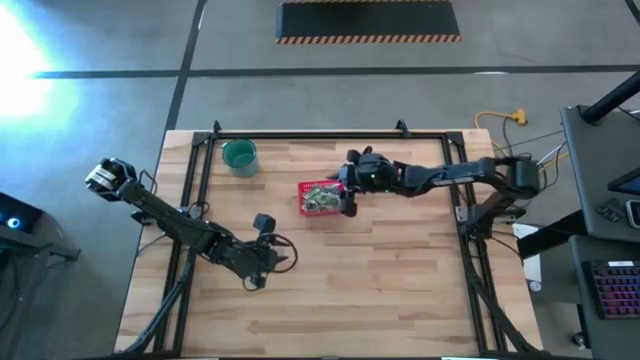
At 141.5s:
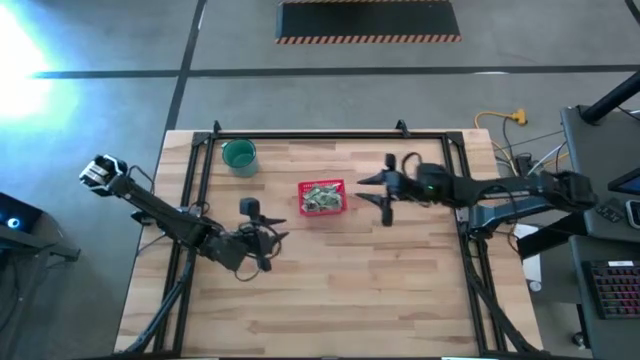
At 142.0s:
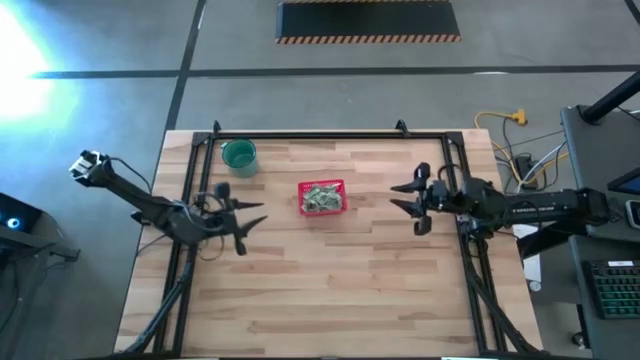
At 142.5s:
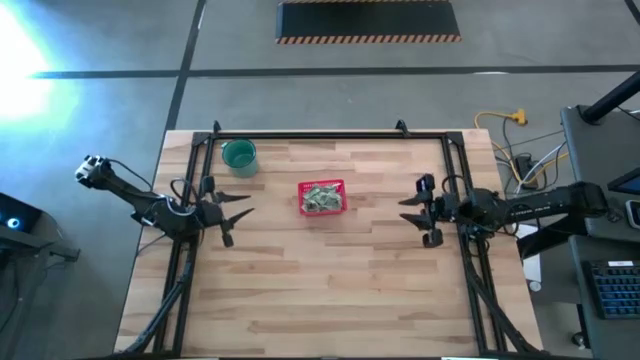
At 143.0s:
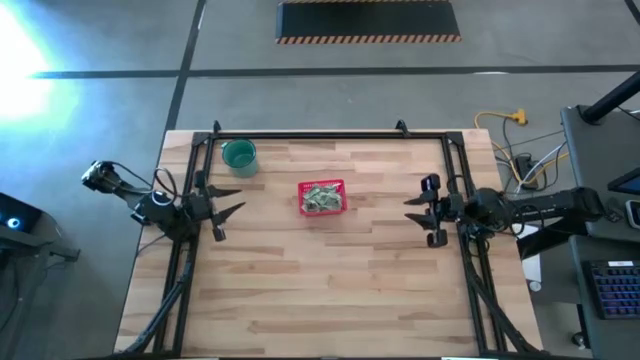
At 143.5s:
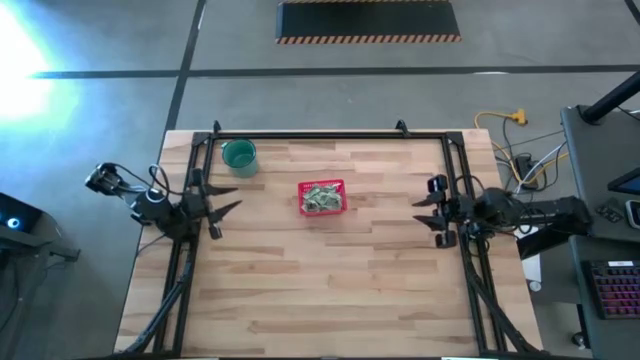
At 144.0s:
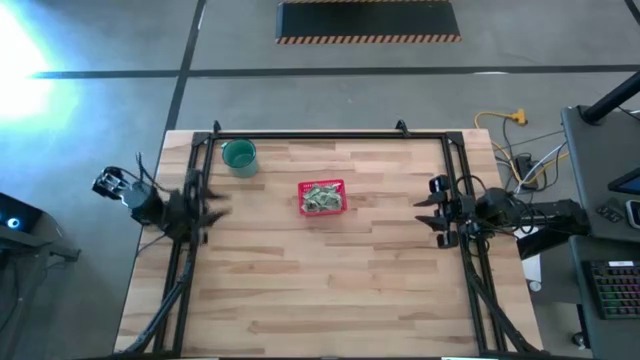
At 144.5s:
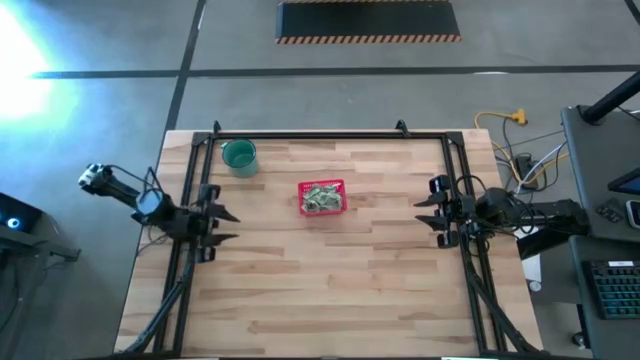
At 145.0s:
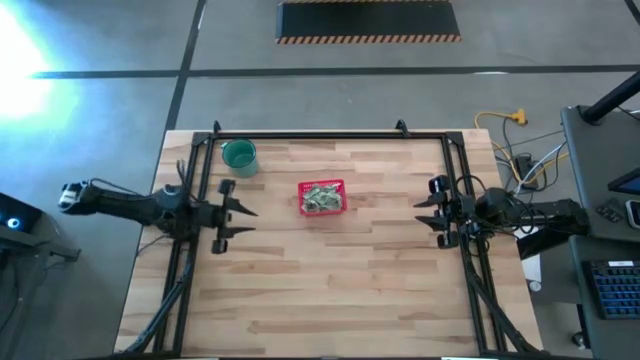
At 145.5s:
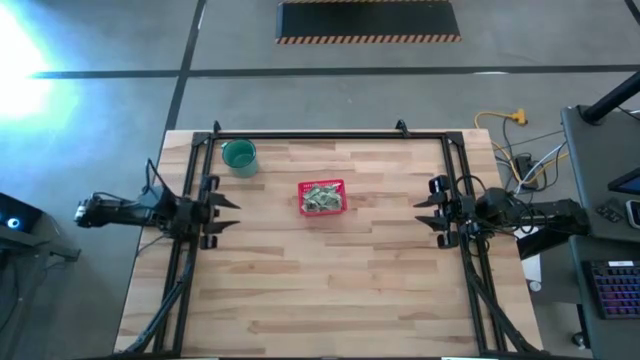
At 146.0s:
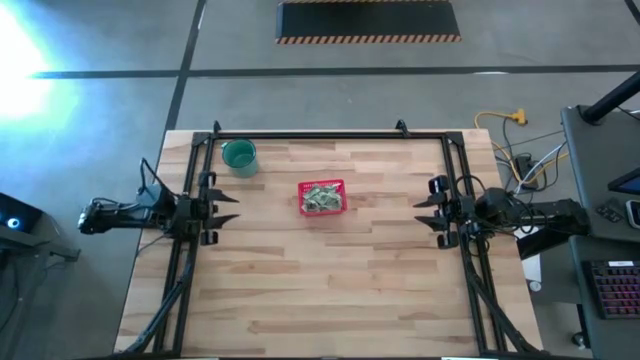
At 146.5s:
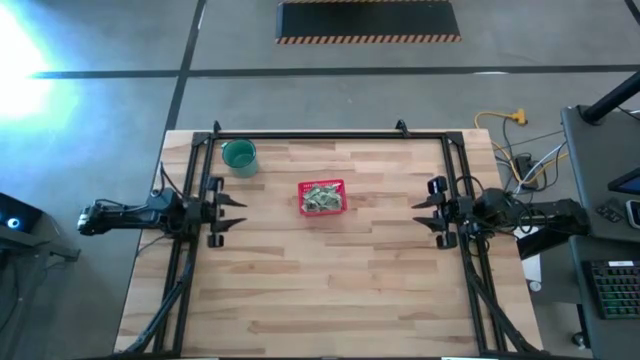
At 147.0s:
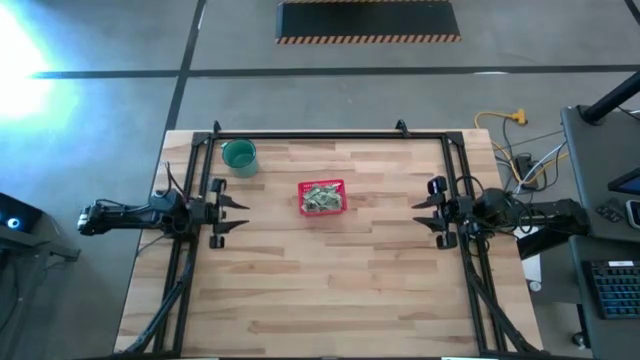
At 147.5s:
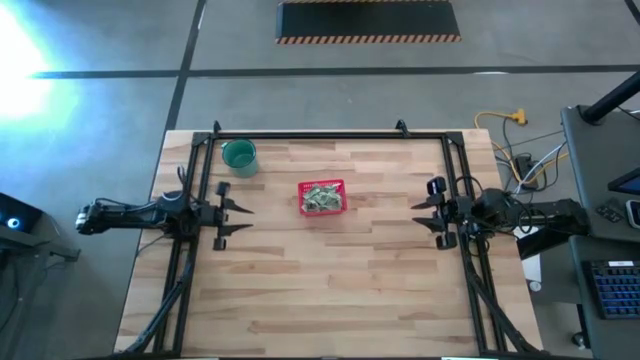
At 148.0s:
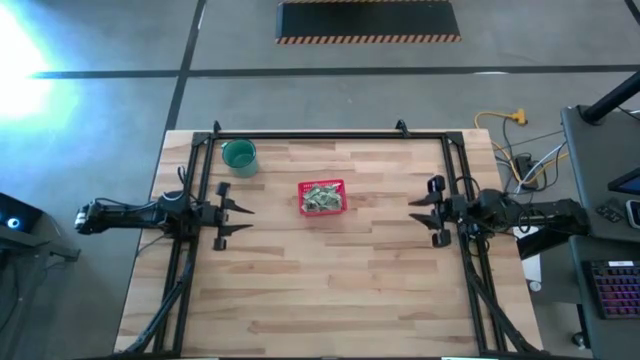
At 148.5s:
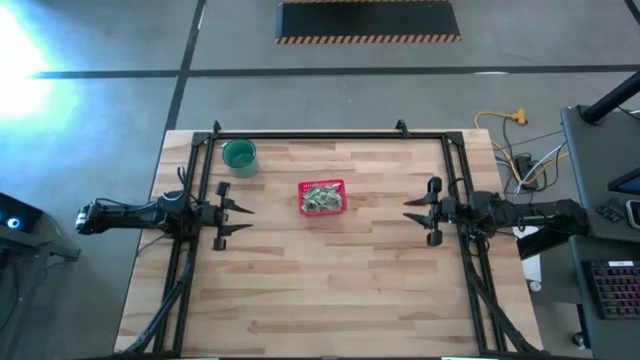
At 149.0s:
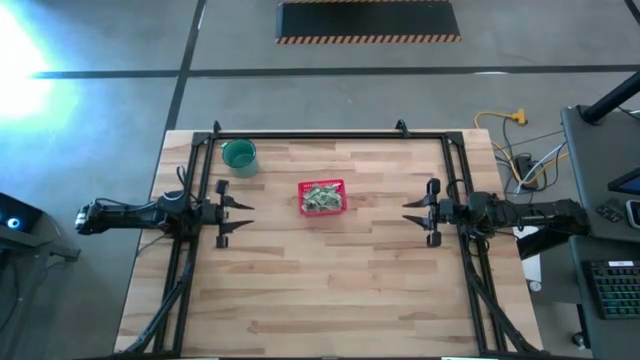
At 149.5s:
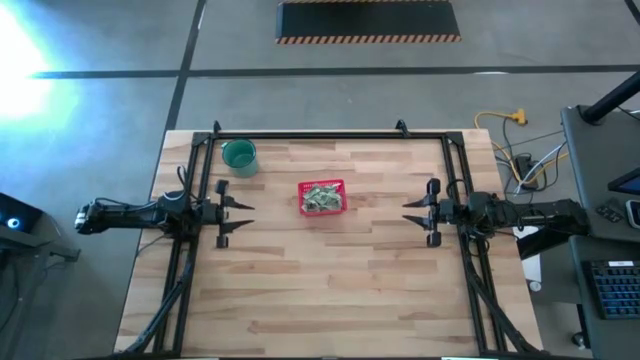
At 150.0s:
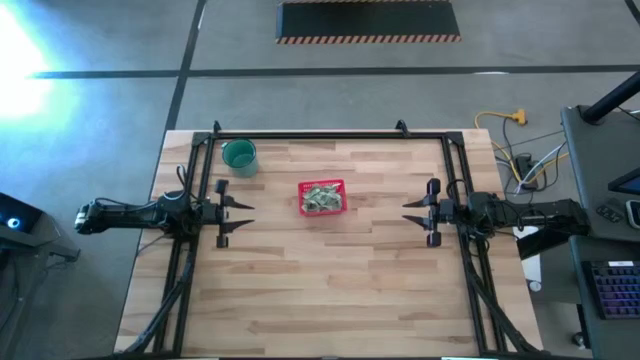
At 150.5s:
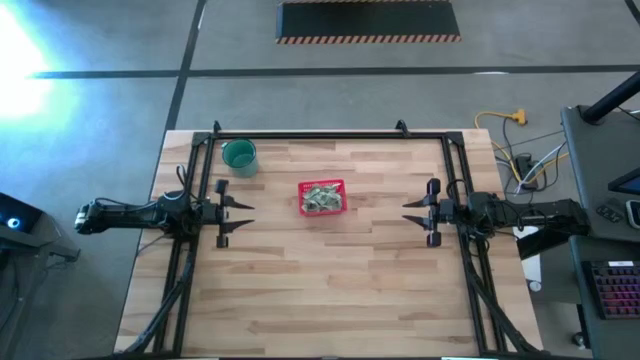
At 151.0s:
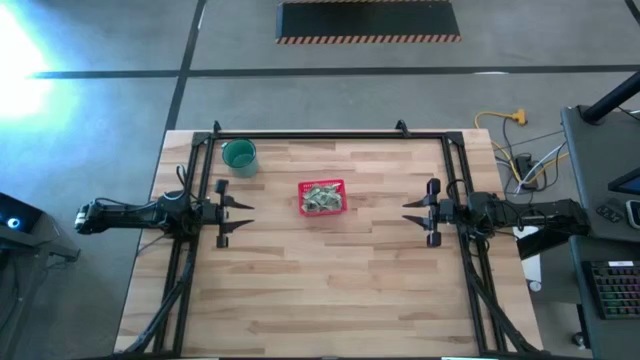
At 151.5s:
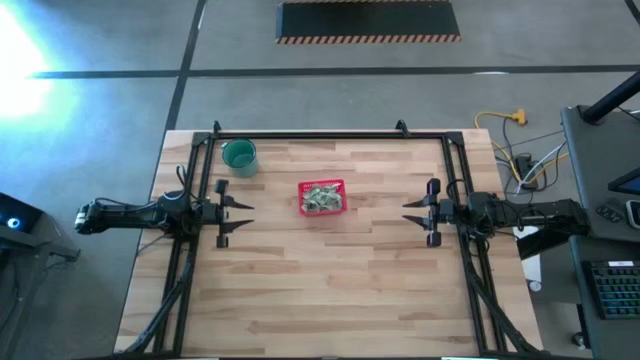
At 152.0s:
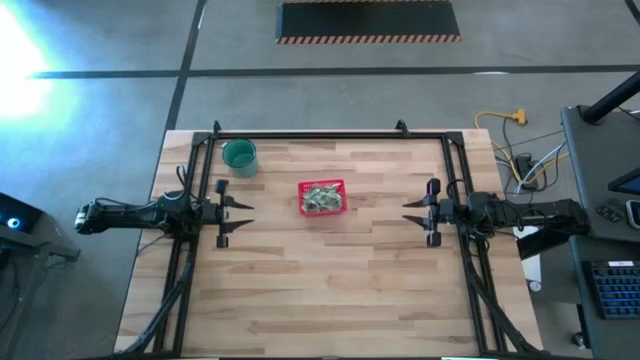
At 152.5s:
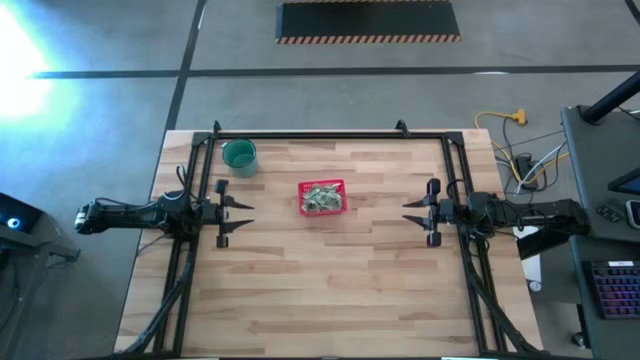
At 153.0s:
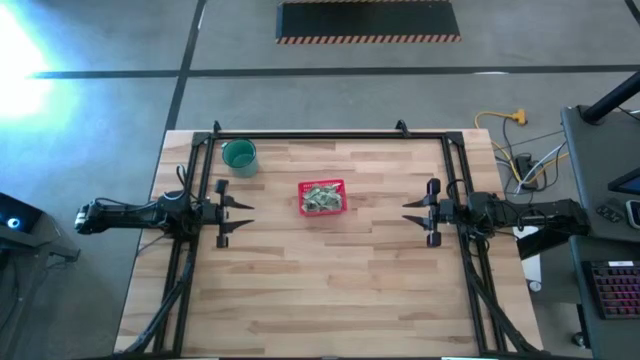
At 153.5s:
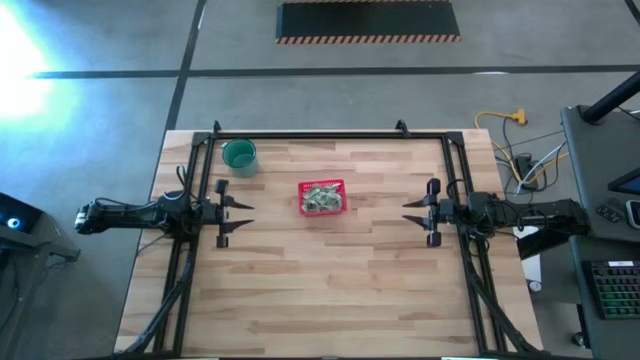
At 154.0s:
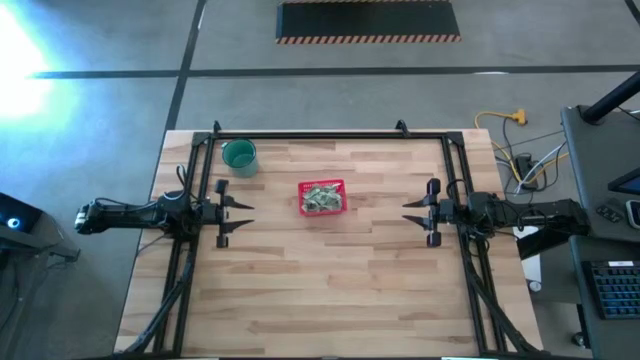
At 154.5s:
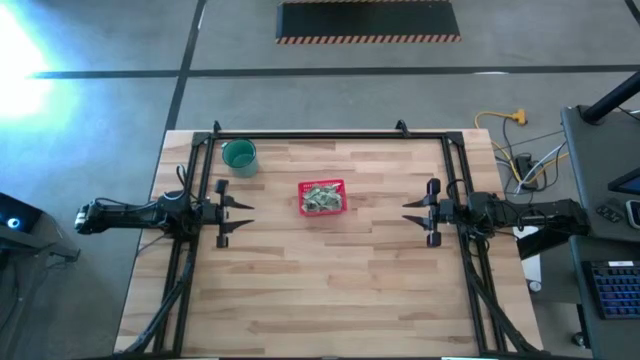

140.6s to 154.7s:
Task: Pick and place items into bin
Return to Home Position

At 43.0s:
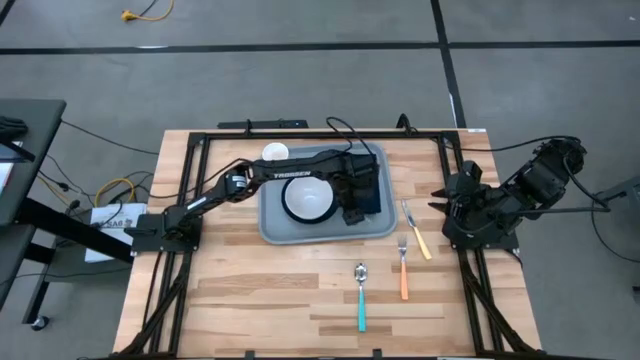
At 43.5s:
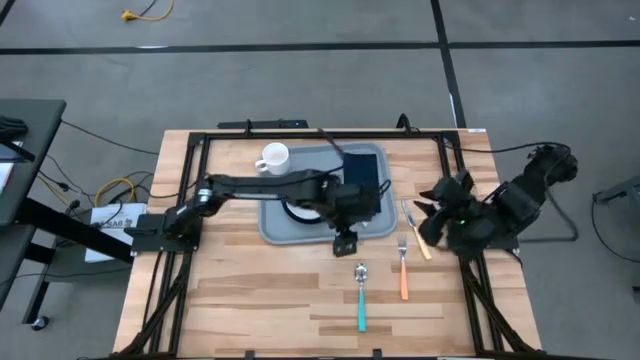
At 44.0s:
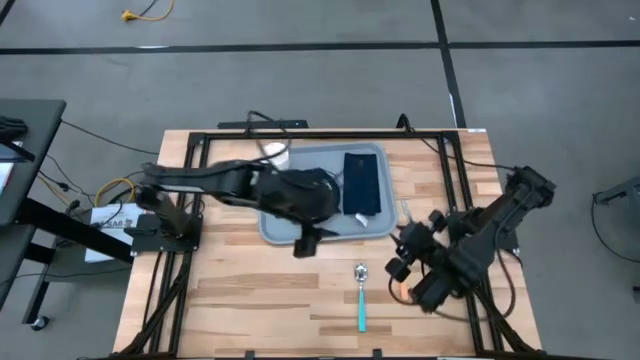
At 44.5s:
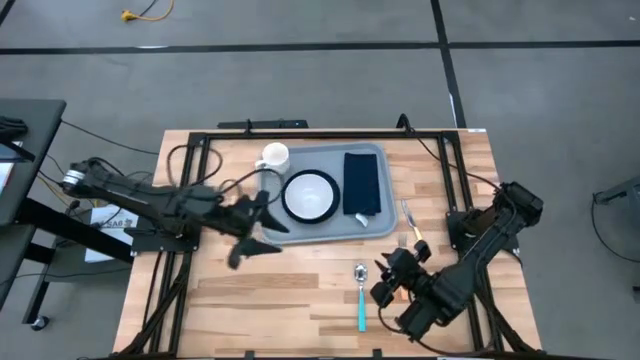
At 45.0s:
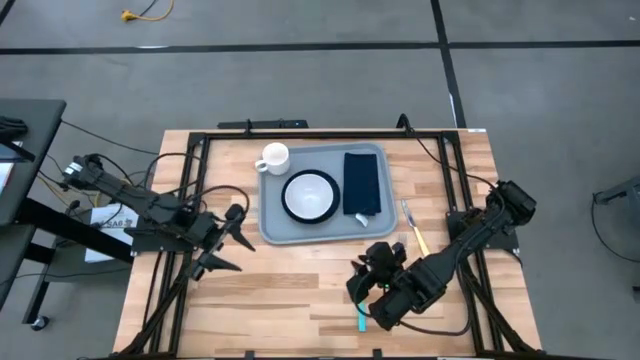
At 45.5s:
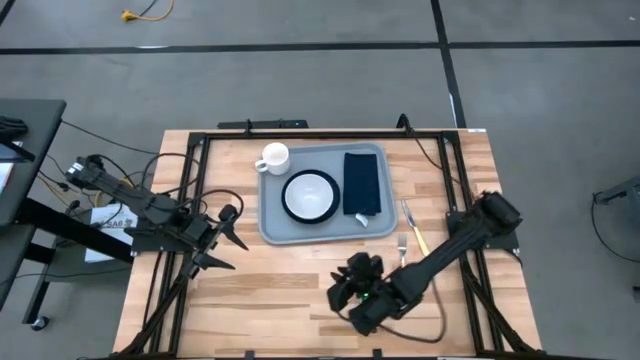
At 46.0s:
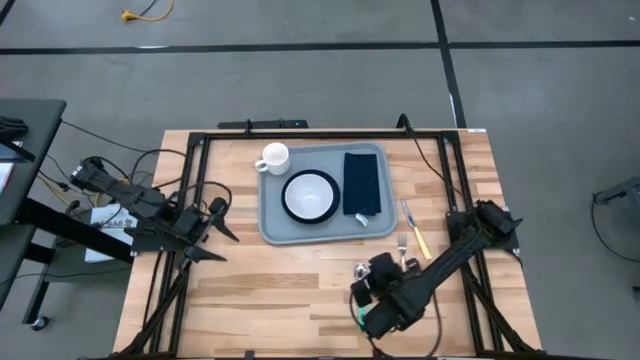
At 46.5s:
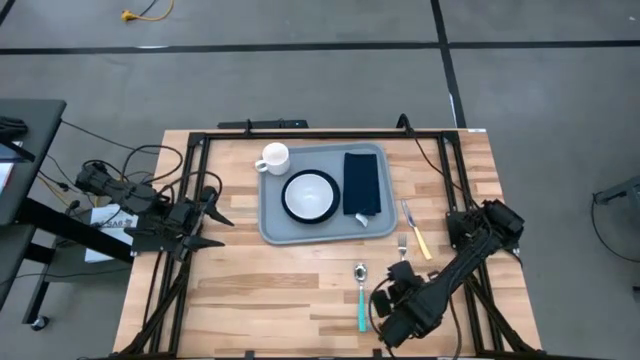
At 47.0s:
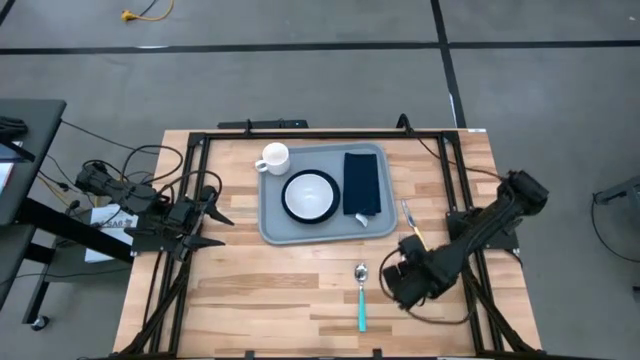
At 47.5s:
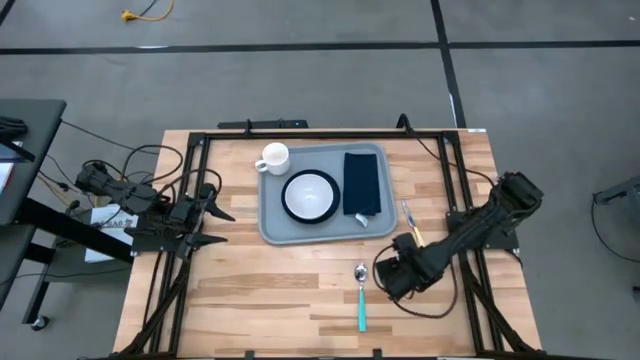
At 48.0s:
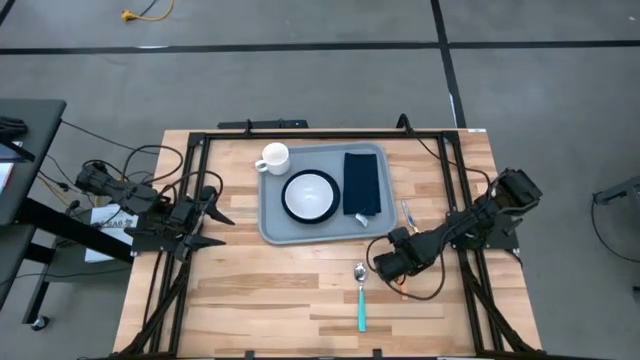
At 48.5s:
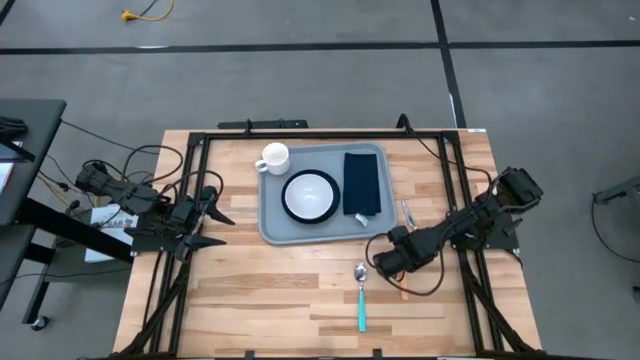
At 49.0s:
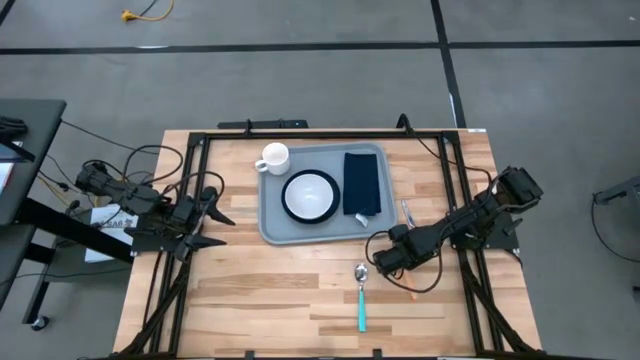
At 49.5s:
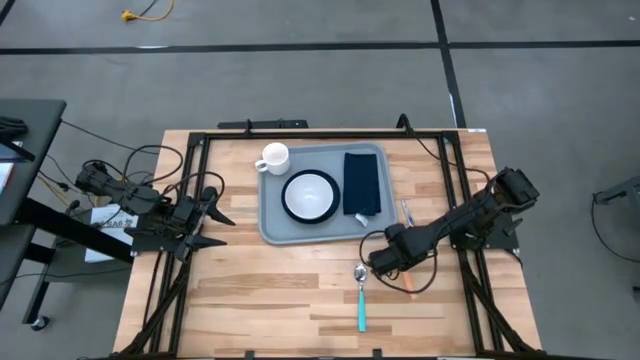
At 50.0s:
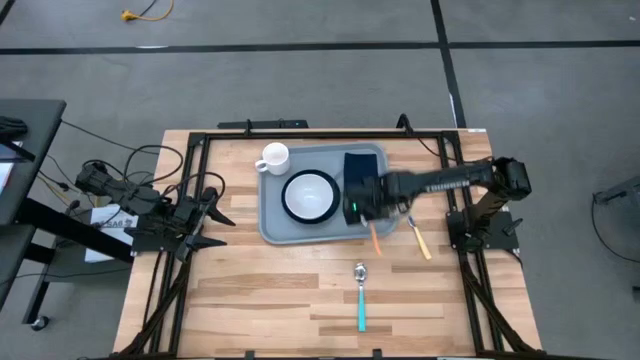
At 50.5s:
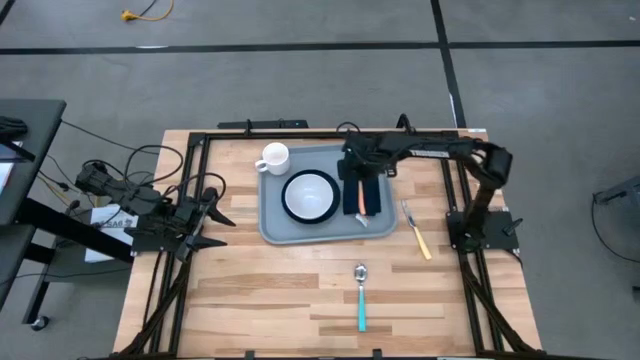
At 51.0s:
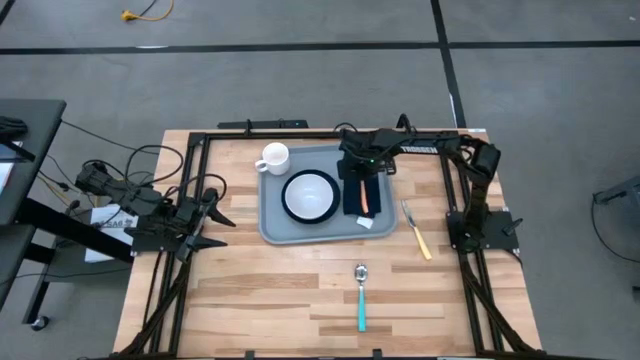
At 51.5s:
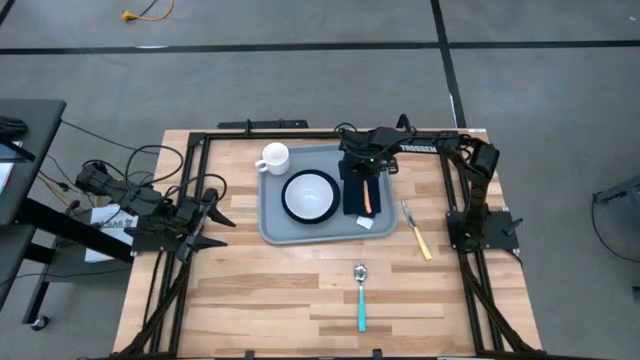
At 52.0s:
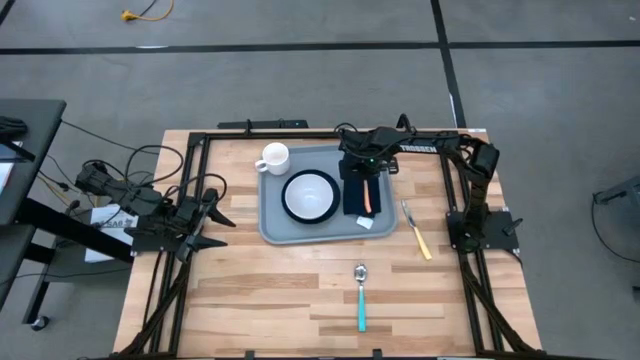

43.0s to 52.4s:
Task: Set up tray
Put the orange fork on top of the blue table napkin on the gray serving tray
